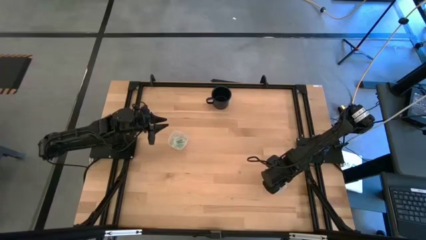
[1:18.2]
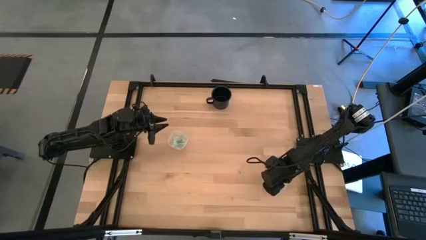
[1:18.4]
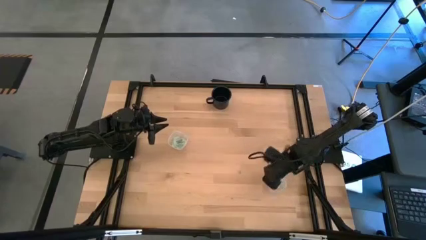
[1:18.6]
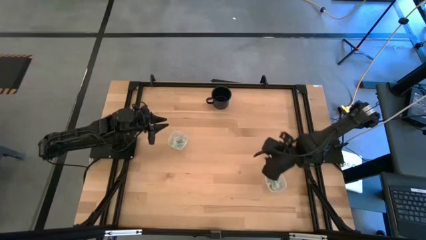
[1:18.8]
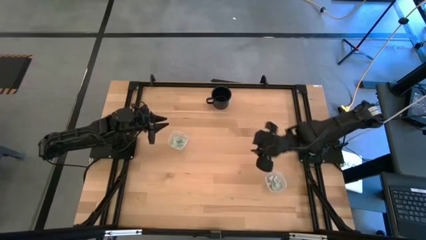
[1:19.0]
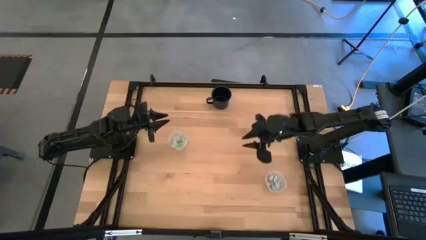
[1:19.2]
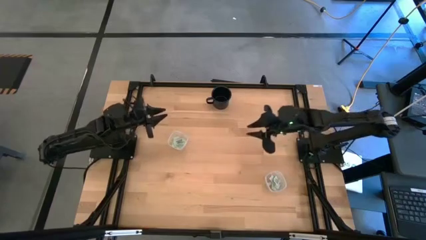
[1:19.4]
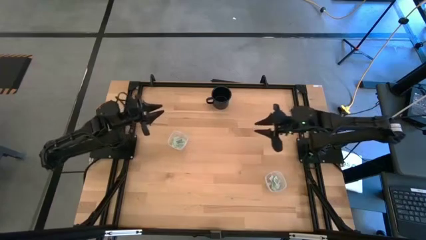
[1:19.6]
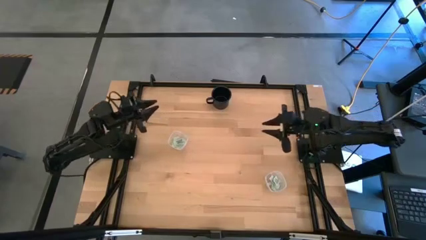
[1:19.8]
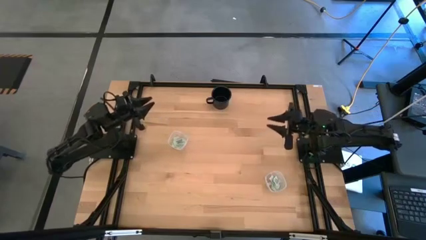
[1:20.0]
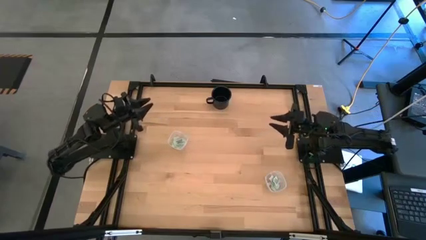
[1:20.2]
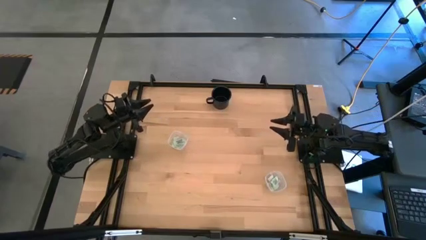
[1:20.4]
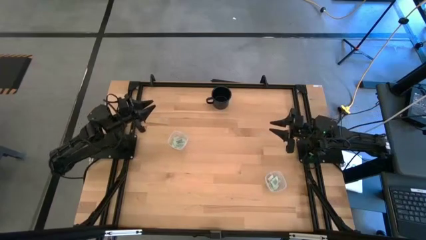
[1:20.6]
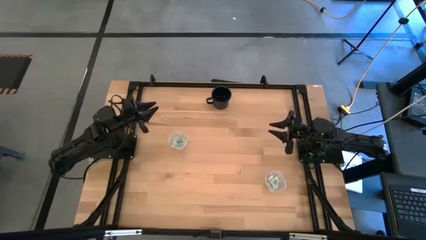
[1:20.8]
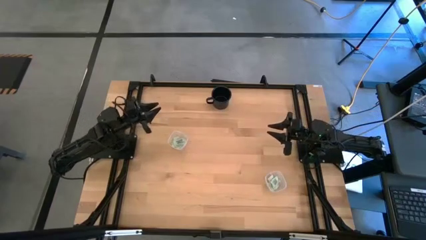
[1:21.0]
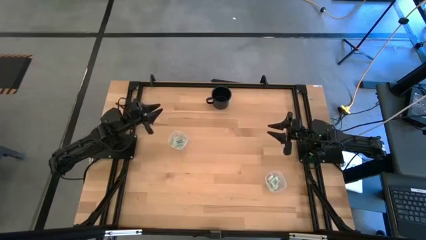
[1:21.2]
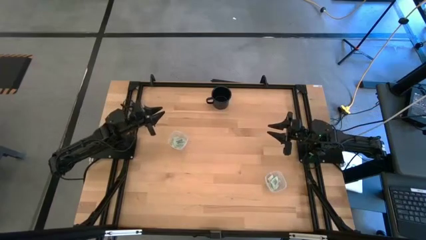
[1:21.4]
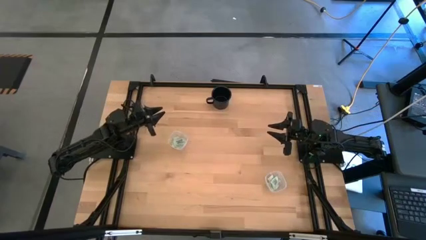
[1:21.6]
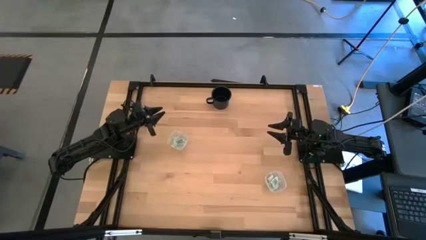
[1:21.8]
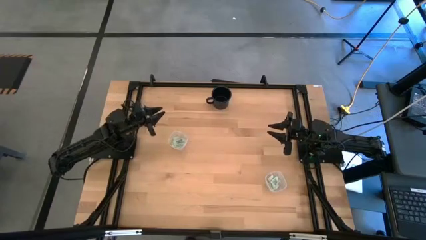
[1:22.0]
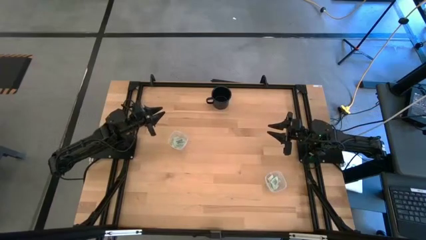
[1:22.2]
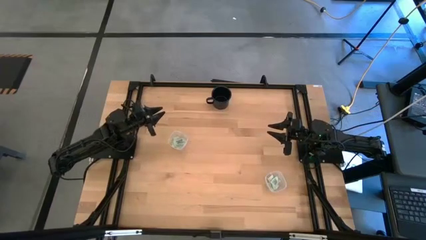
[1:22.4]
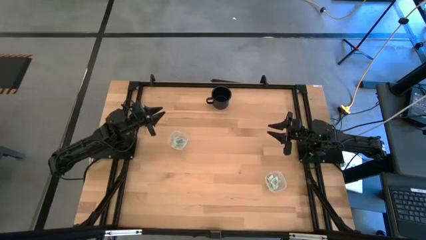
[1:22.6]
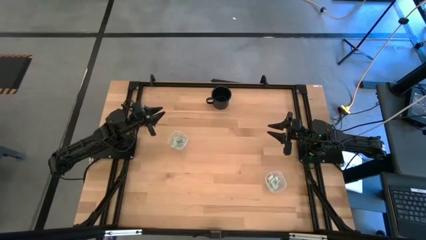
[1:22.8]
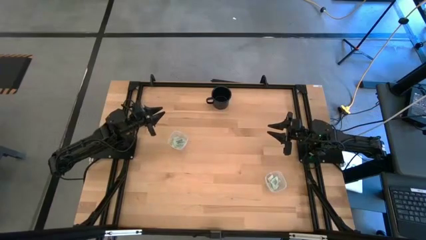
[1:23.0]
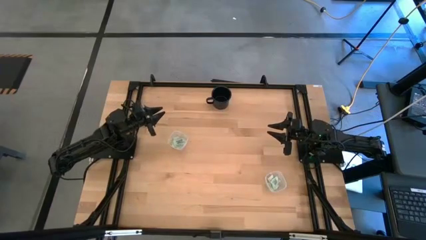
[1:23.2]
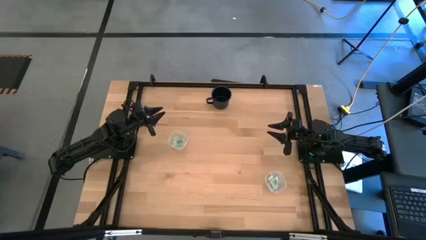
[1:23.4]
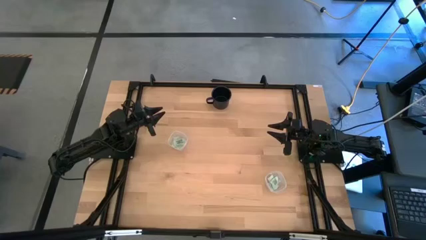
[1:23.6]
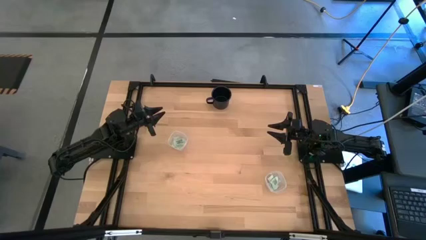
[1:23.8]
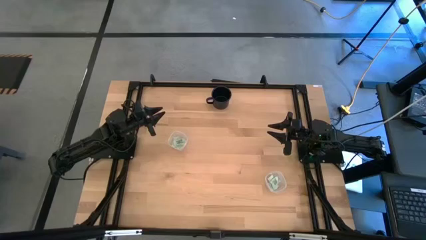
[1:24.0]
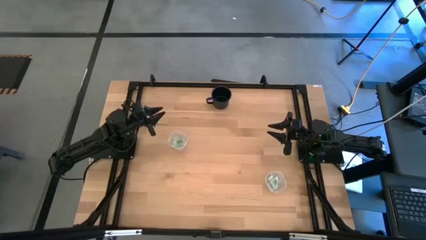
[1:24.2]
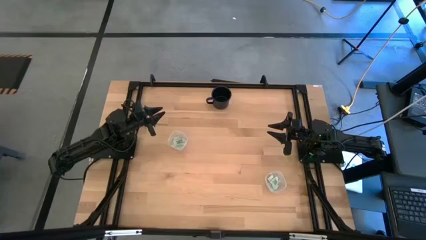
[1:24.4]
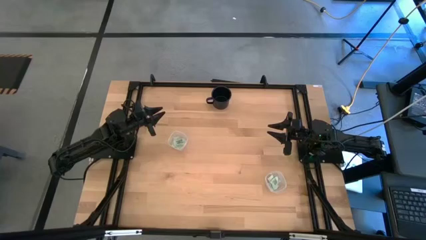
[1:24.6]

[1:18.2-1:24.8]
Task: Pick and place items into bin
Return to Home Position

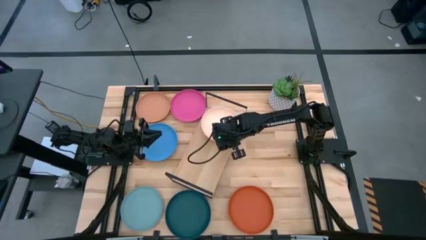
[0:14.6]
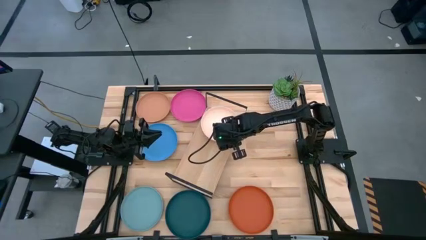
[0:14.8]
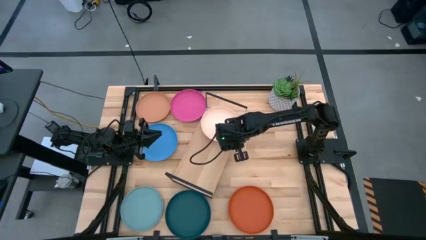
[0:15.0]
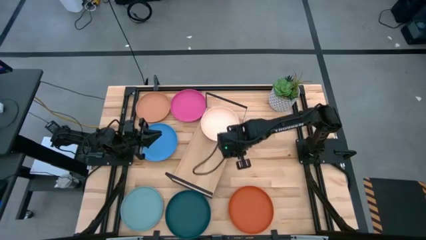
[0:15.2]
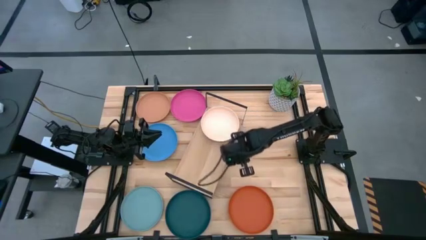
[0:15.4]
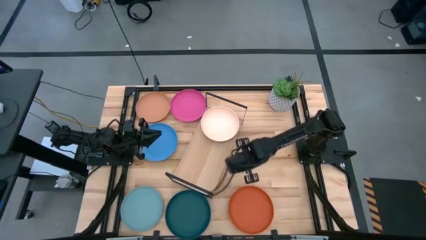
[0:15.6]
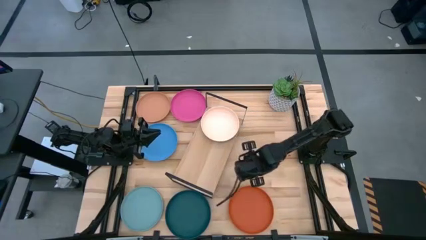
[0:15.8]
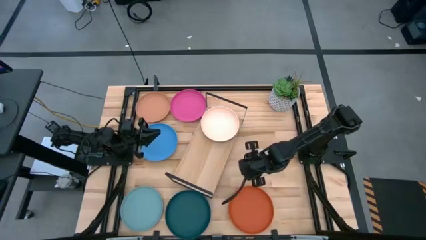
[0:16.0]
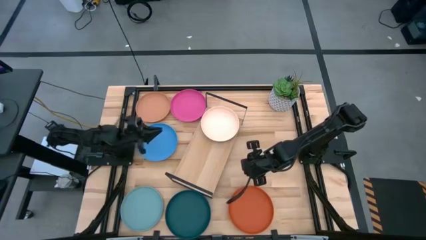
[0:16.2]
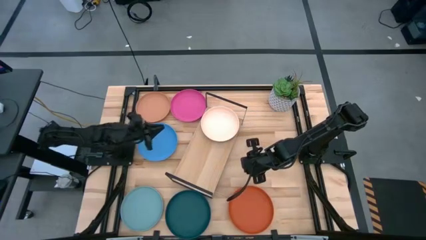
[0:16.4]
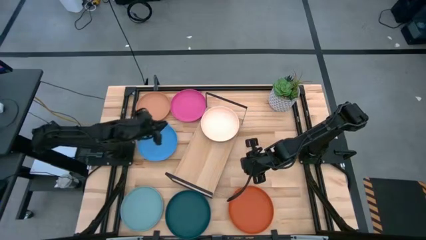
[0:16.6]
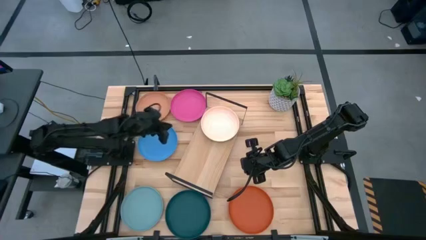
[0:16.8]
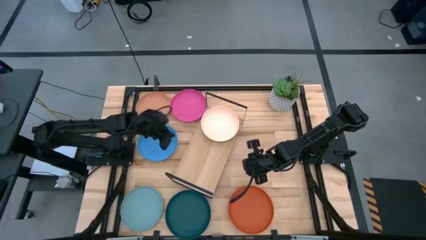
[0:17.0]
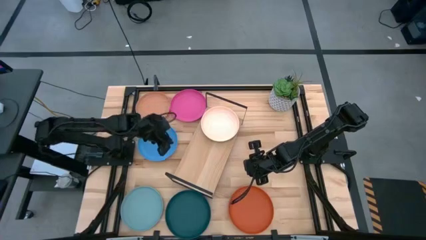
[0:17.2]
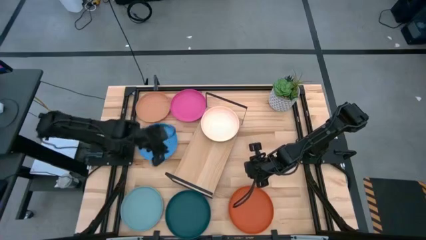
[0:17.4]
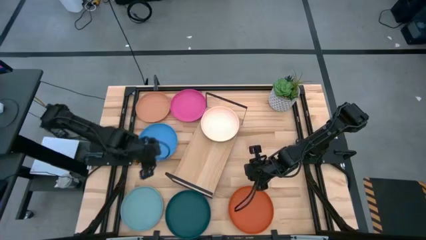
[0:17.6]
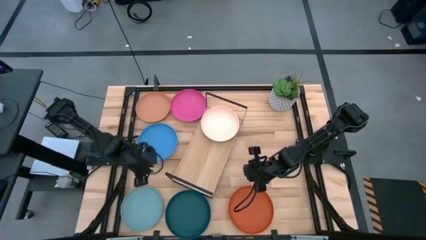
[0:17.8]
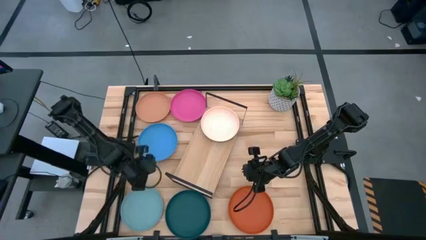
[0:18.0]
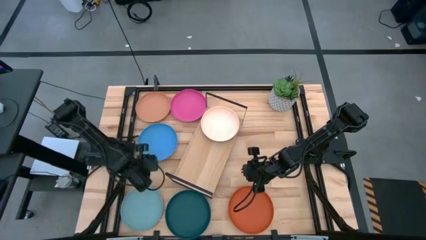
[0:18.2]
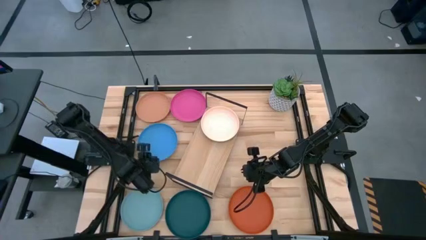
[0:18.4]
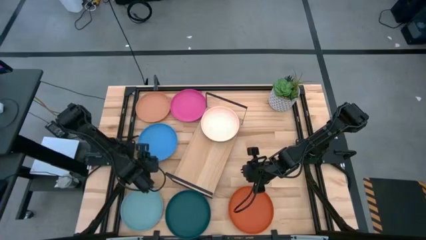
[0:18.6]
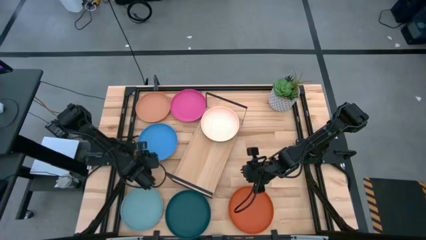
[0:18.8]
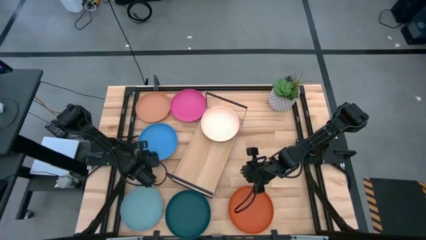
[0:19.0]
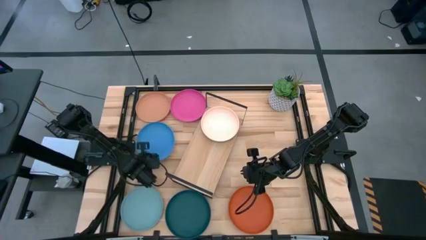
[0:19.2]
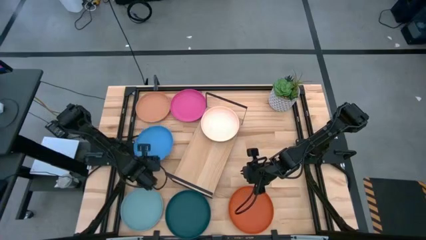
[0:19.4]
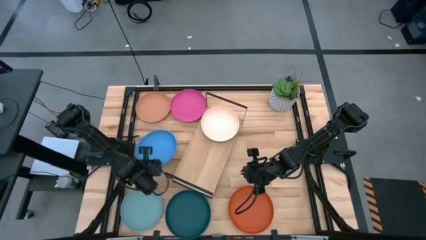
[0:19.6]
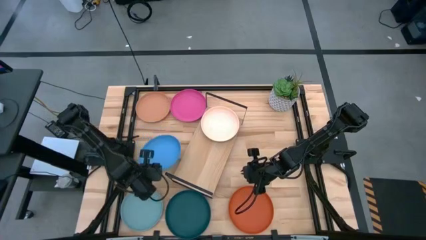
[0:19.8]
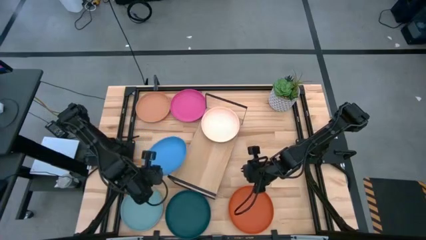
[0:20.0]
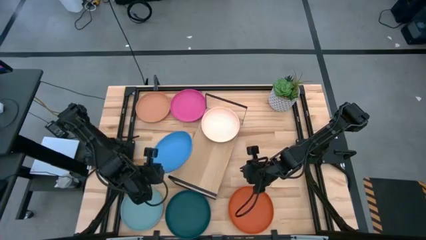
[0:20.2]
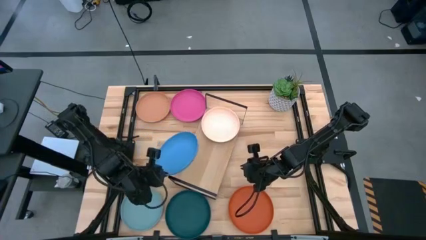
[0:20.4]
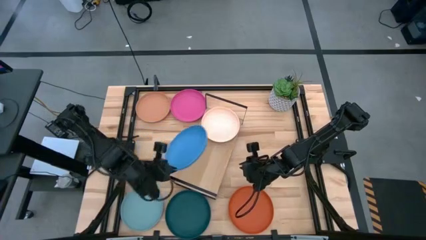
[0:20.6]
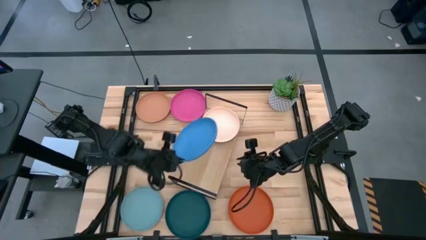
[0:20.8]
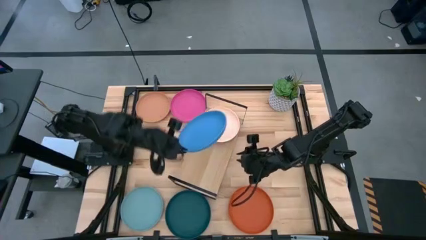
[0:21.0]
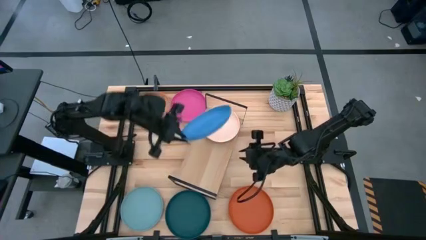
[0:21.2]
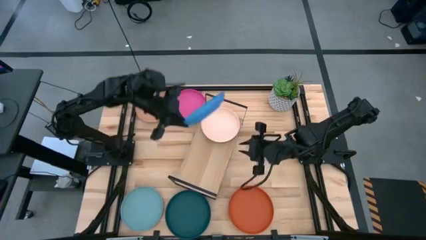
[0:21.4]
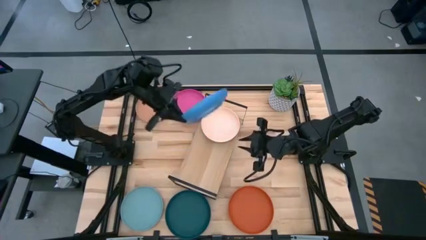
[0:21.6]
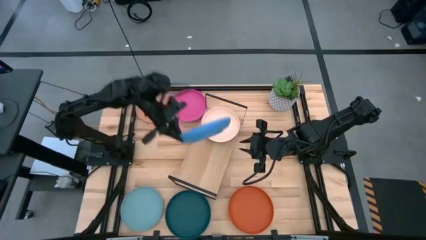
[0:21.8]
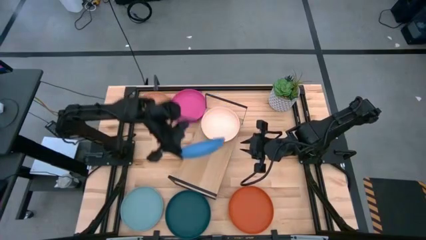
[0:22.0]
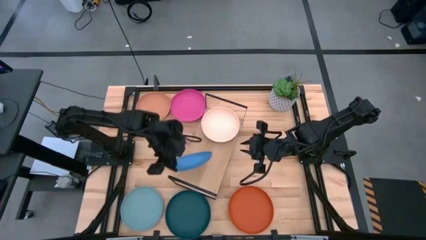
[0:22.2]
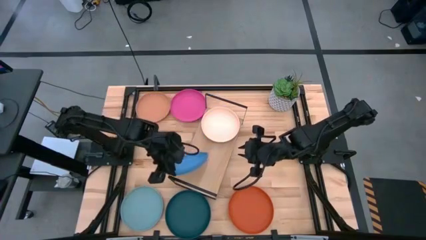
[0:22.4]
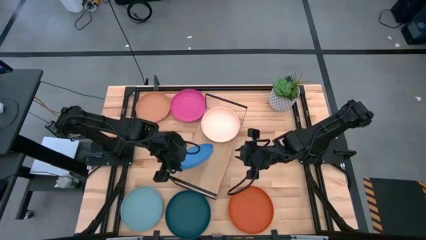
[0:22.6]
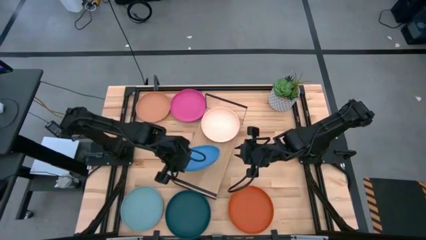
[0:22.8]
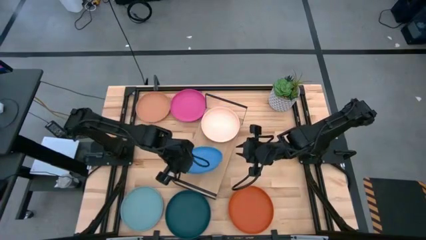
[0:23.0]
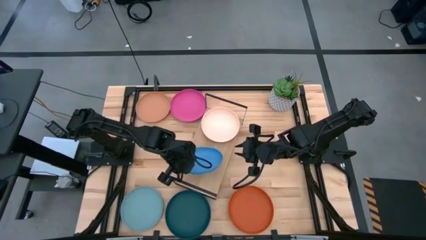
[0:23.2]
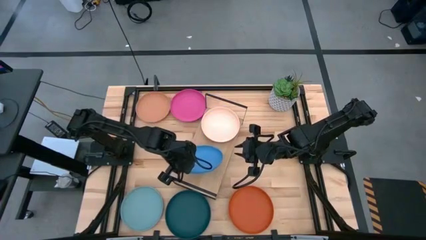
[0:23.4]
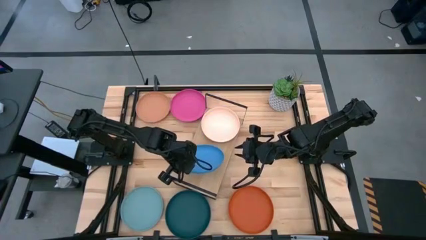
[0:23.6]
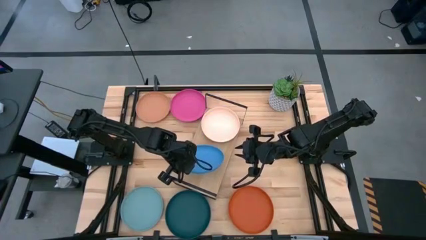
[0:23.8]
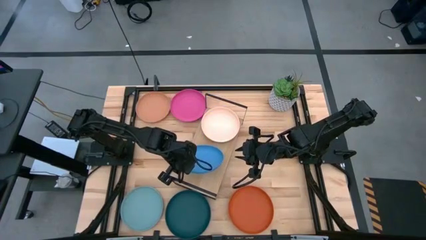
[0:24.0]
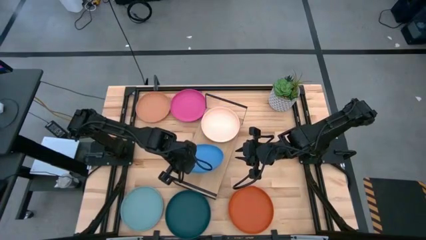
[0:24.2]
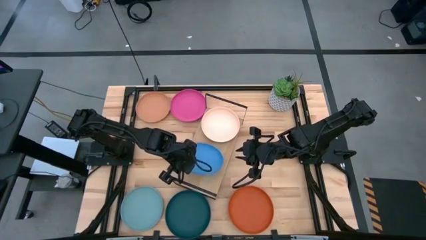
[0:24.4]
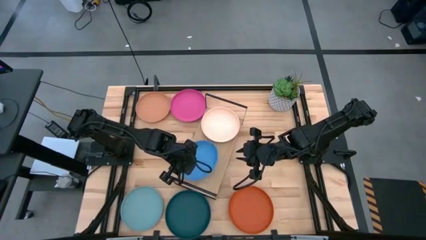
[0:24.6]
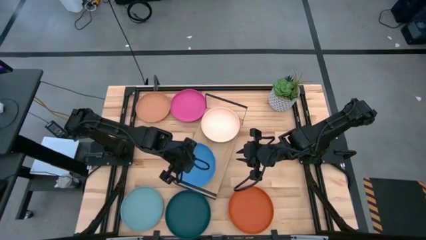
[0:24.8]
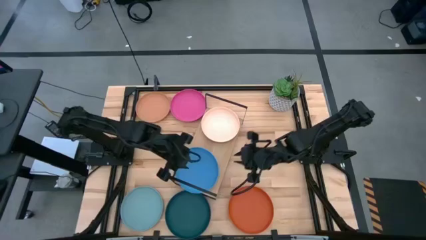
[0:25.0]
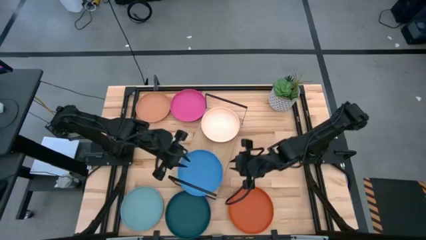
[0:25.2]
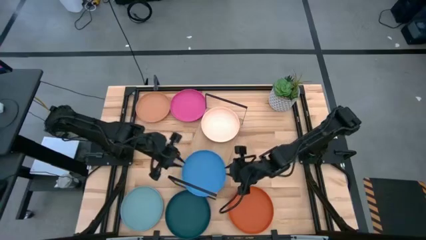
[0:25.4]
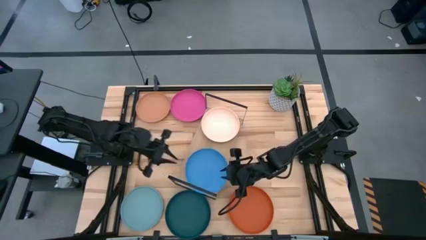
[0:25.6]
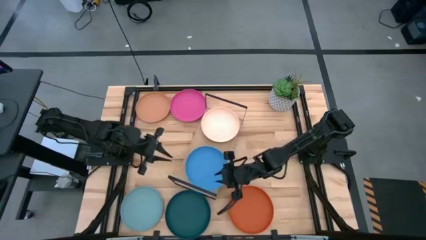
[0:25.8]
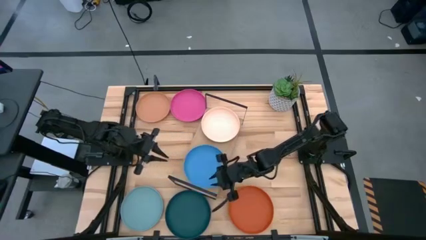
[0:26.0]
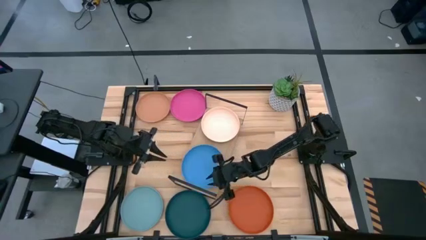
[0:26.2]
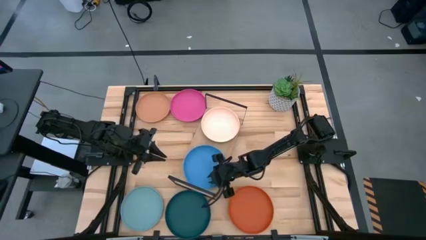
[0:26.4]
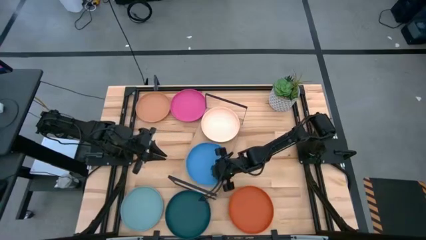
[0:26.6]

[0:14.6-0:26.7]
Task: Place and stack plates onto a shelf
Put the blue plate on the shelf
